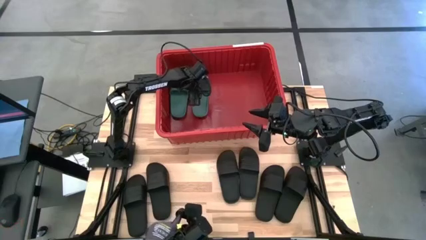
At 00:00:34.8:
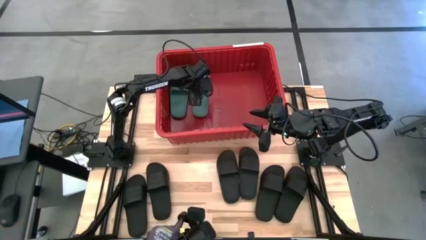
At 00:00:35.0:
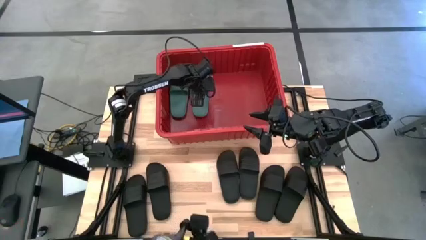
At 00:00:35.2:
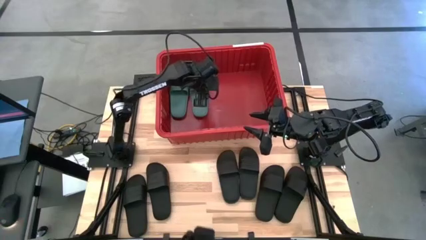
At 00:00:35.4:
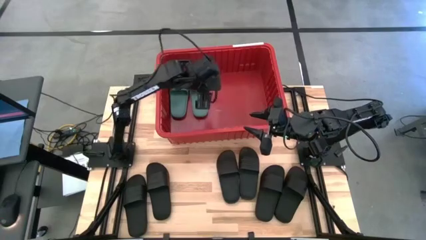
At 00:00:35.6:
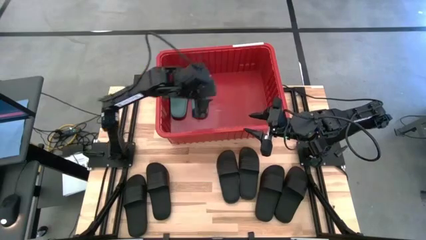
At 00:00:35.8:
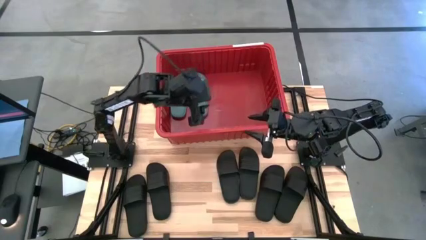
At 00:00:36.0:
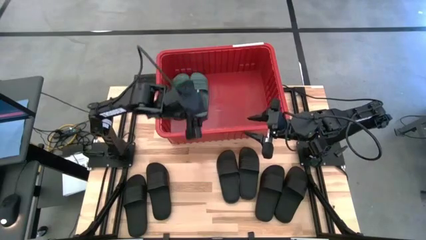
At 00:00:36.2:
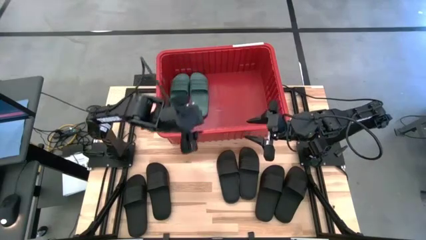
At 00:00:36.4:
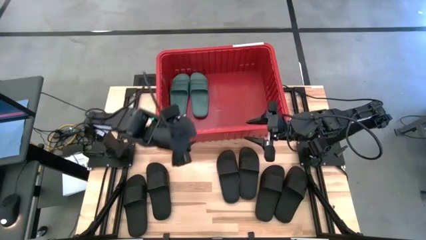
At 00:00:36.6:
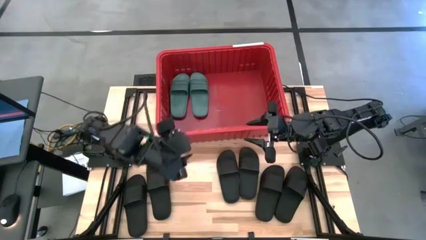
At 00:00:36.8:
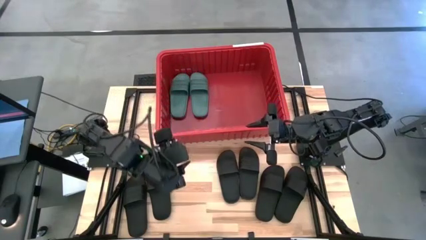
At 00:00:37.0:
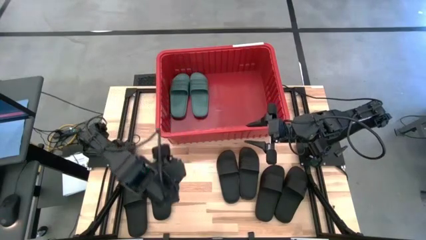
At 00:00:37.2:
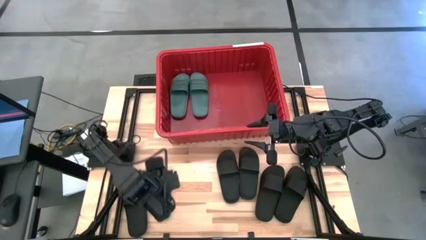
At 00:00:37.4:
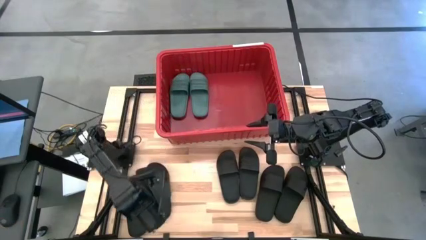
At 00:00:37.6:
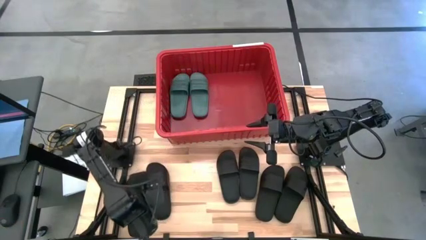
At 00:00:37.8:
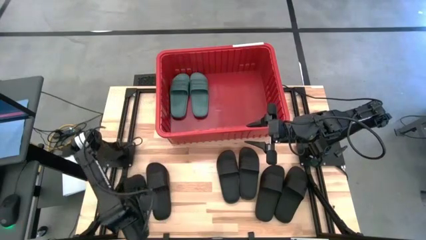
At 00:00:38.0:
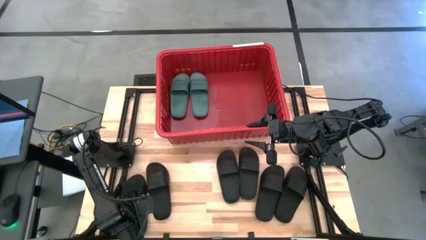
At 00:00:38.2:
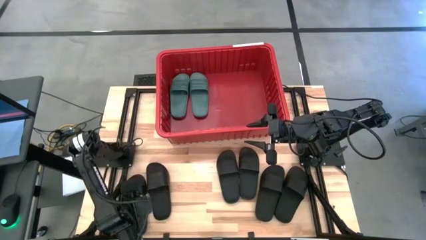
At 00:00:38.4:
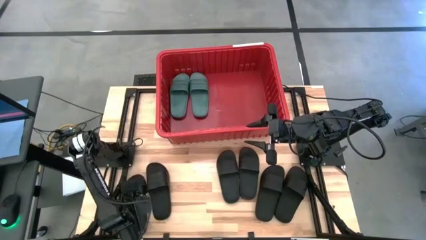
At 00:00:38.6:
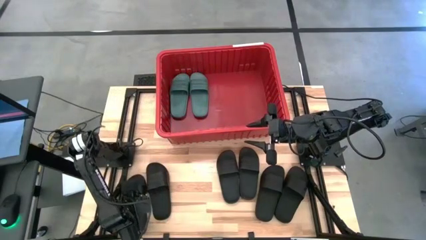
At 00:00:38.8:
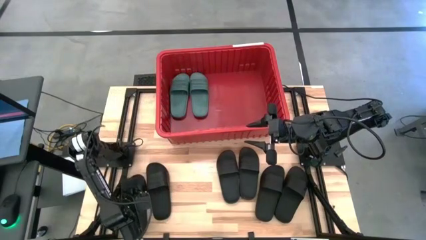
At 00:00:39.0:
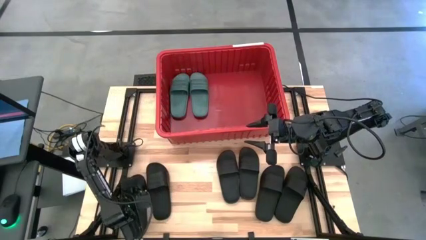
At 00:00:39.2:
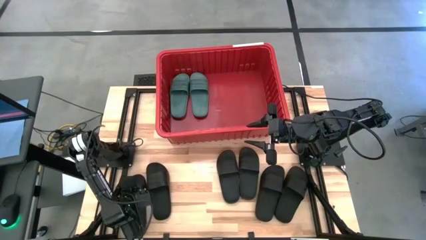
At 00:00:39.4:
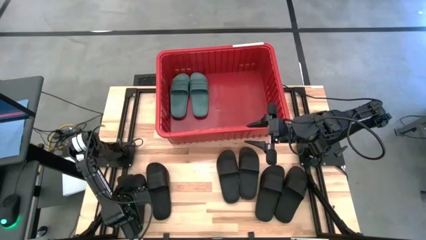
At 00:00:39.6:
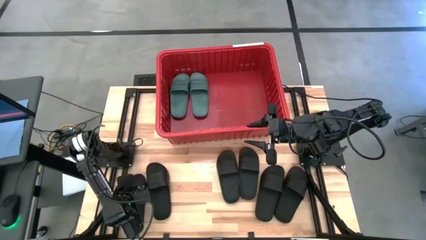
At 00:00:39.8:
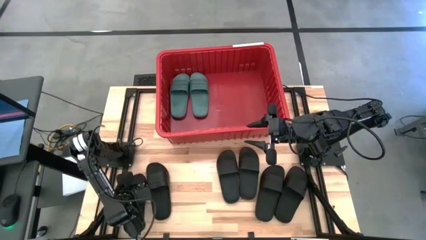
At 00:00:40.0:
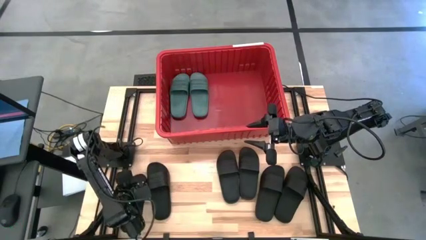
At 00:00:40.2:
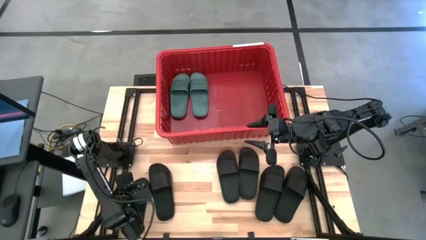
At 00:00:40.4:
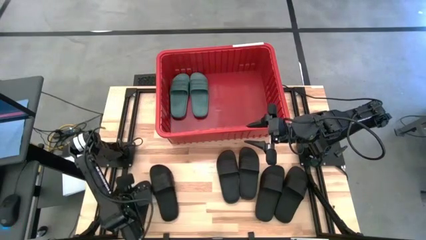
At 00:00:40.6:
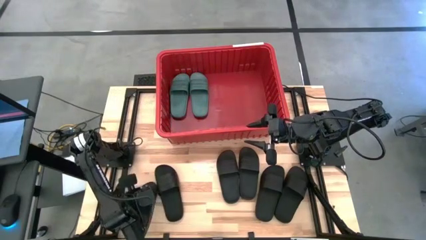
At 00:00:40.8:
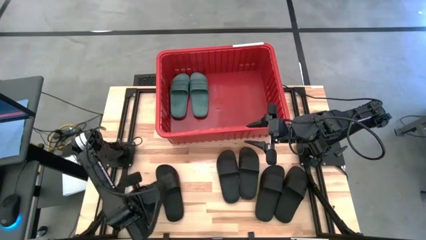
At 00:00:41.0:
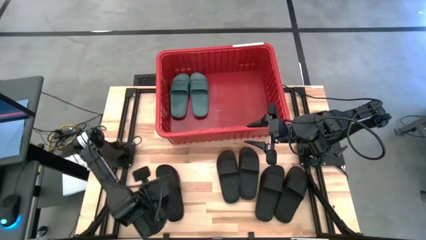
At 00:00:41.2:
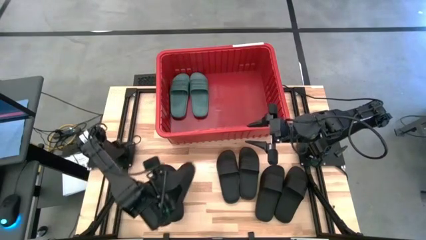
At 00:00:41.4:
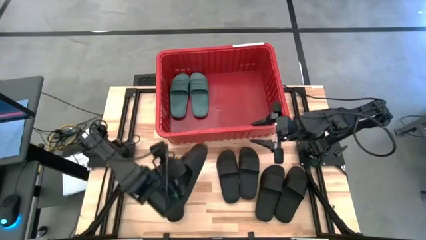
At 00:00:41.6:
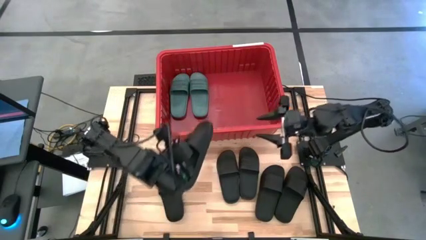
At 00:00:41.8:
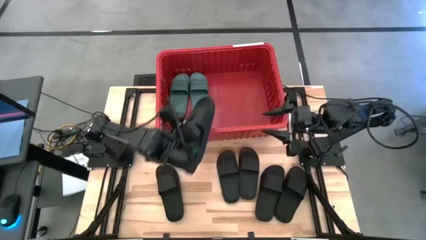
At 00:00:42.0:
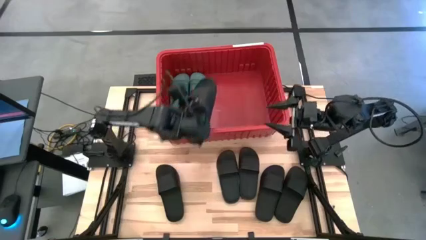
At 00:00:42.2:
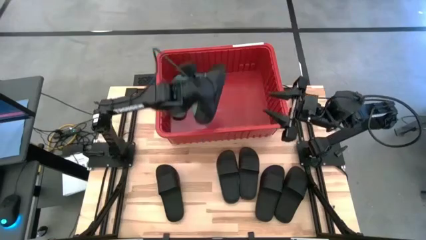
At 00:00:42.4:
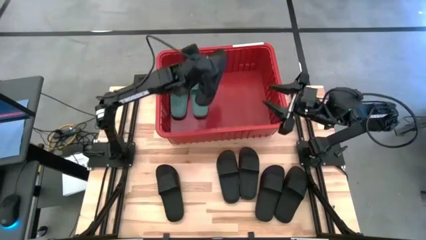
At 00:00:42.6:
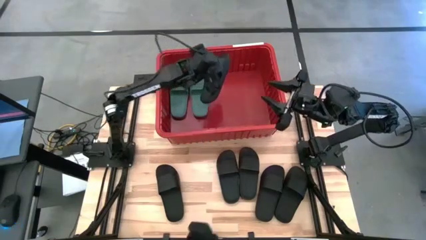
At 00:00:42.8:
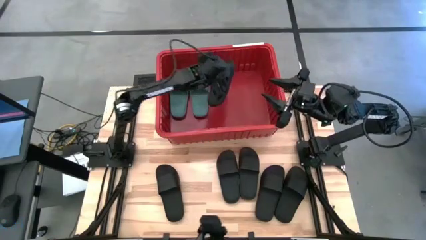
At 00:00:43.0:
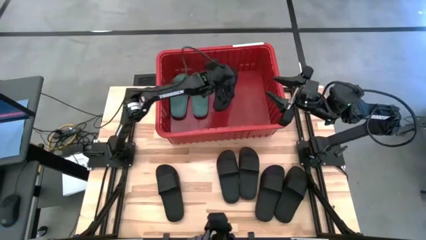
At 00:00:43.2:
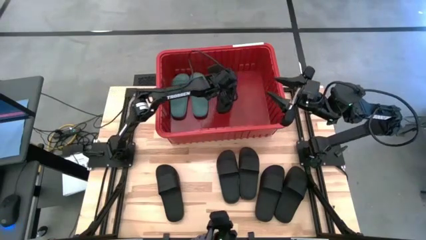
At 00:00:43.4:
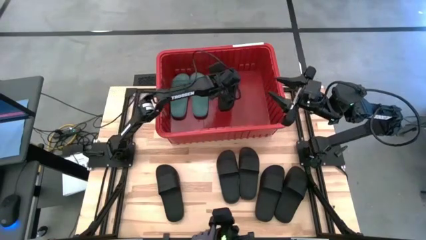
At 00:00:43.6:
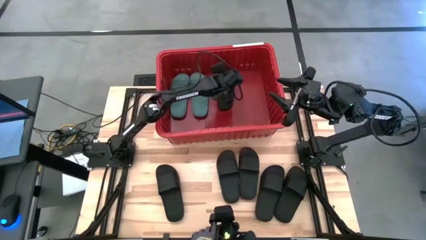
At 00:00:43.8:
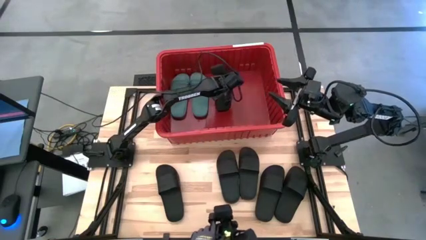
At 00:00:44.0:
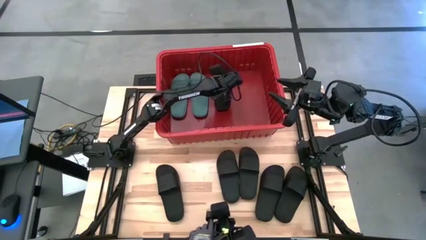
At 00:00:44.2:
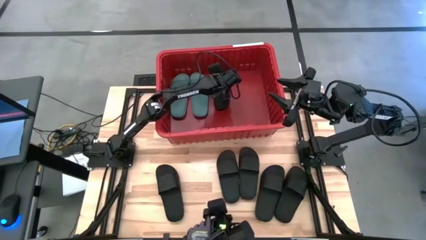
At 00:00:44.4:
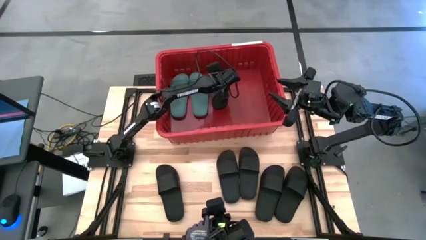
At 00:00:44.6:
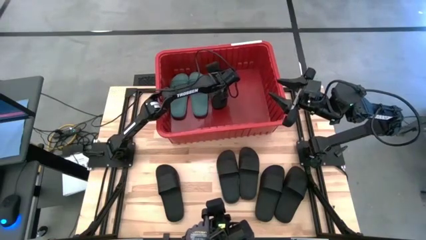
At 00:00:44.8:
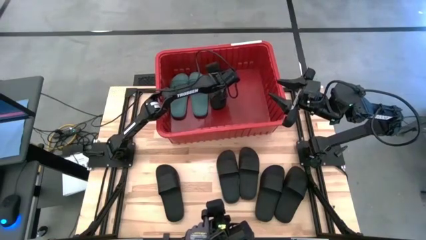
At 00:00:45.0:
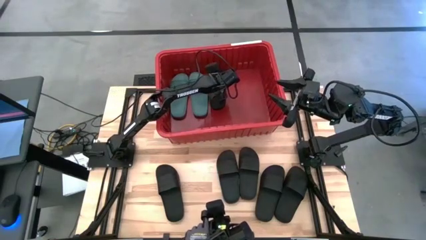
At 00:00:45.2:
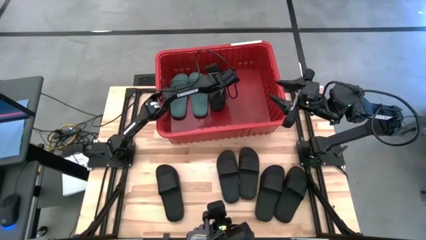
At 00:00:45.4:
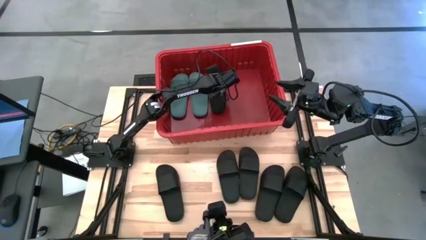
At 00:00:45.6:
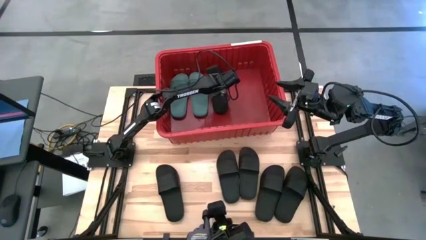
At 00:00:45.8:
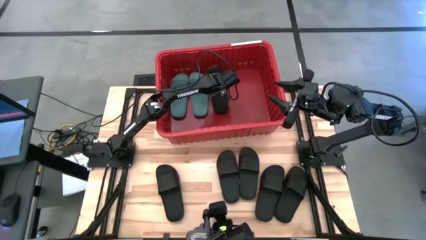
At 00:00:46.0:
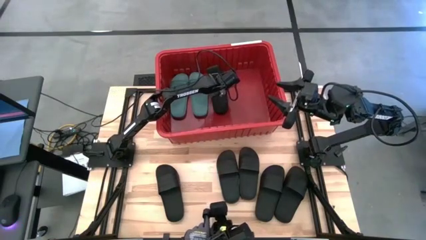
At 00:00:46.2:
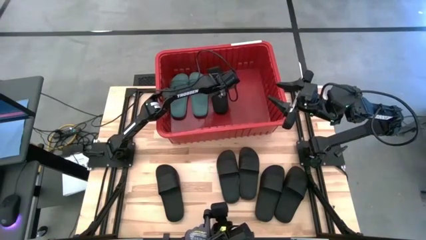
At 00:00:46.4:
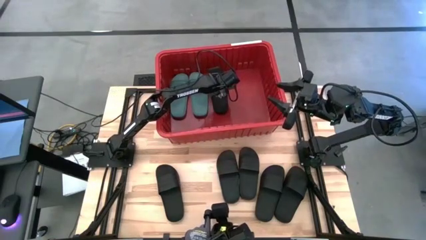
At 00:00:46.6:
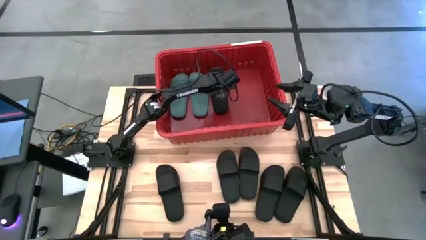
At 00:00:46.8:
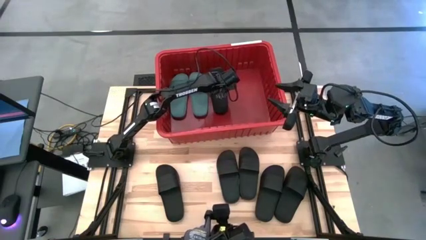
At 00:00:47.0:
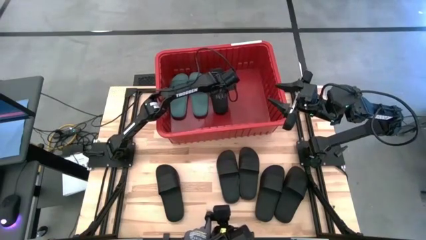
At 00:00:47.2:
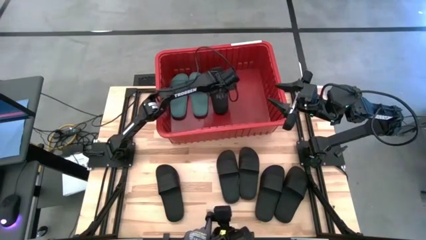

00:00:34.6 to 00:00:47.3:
Task: Pick and place slides into bin
Put the black slipper into the red container
